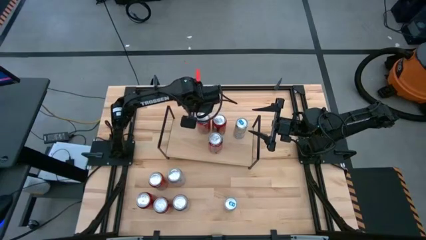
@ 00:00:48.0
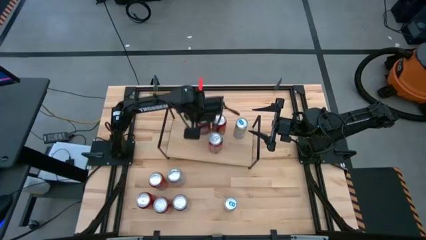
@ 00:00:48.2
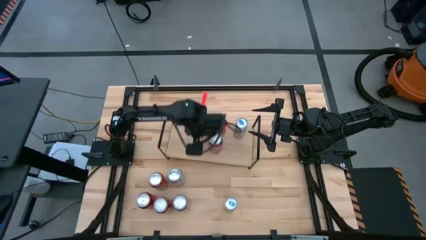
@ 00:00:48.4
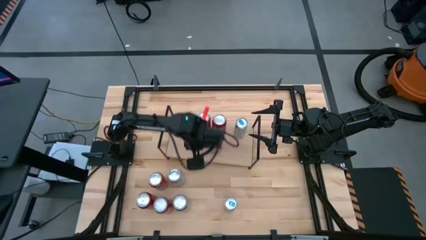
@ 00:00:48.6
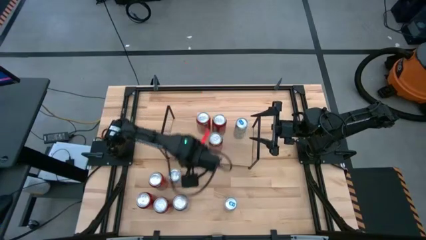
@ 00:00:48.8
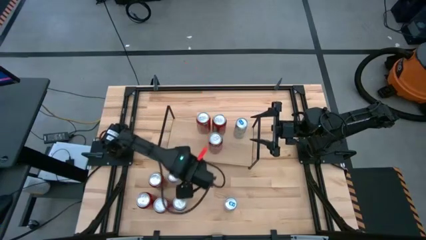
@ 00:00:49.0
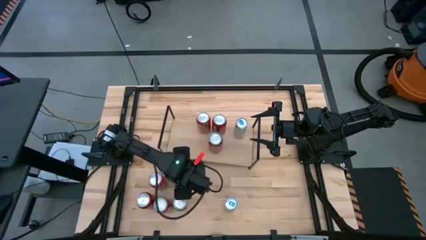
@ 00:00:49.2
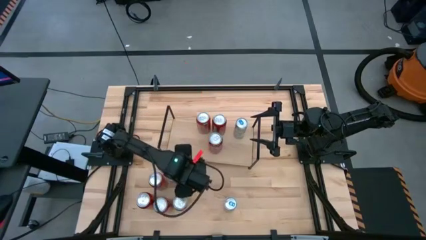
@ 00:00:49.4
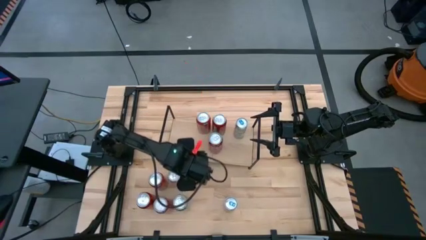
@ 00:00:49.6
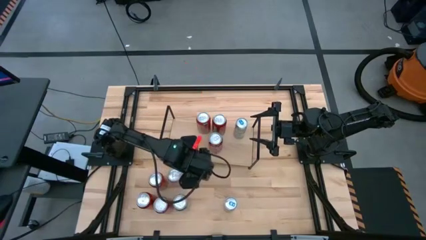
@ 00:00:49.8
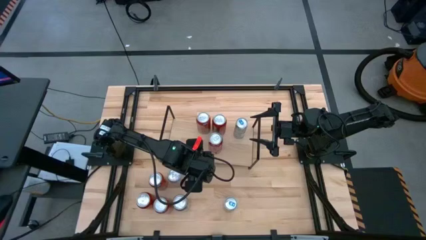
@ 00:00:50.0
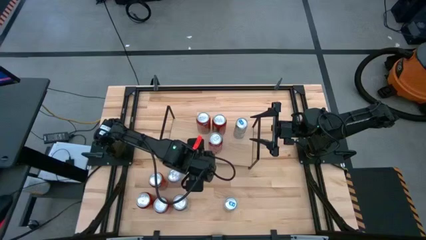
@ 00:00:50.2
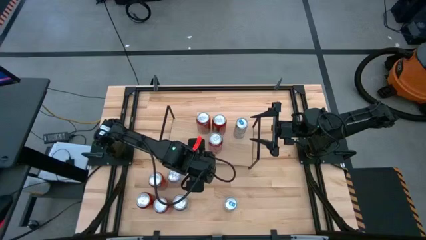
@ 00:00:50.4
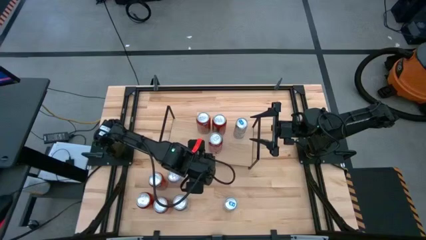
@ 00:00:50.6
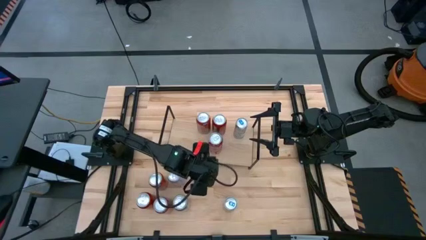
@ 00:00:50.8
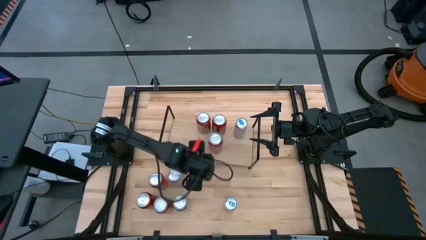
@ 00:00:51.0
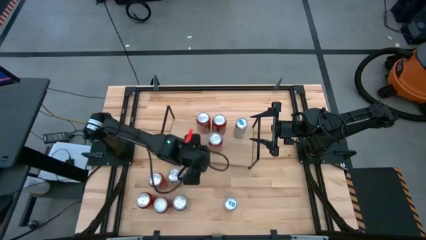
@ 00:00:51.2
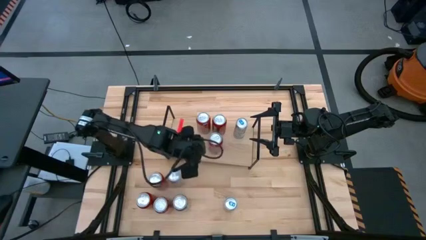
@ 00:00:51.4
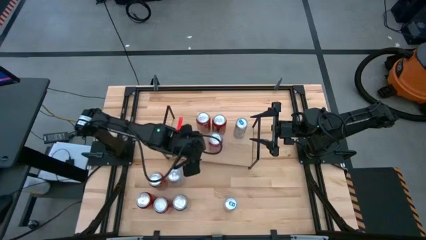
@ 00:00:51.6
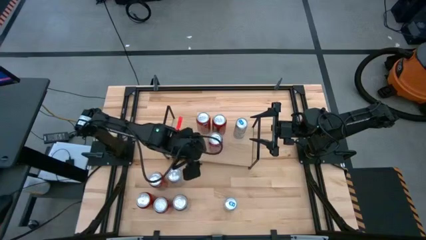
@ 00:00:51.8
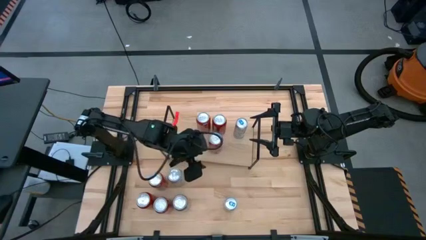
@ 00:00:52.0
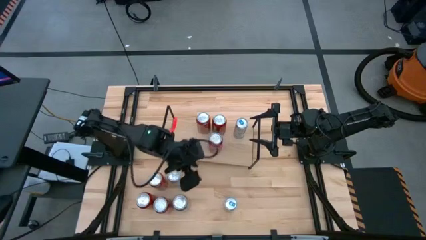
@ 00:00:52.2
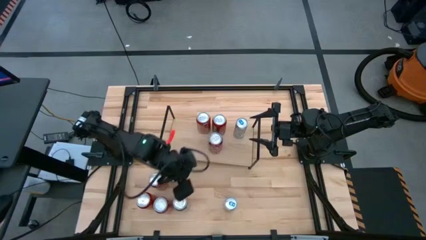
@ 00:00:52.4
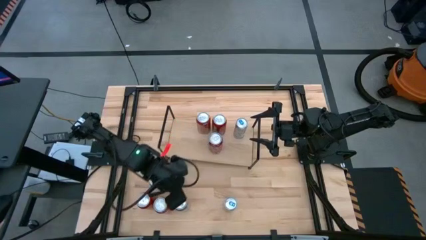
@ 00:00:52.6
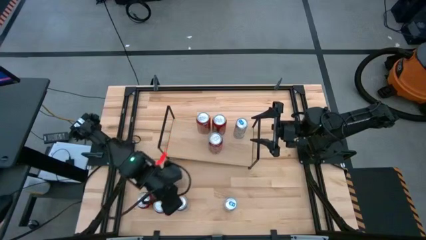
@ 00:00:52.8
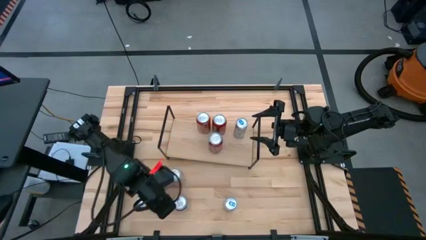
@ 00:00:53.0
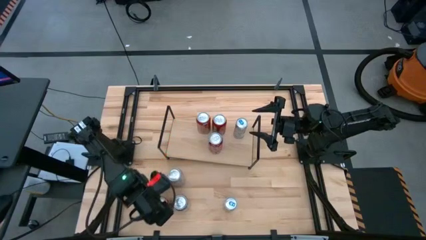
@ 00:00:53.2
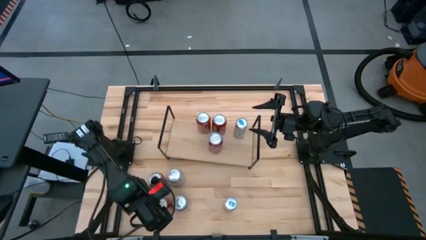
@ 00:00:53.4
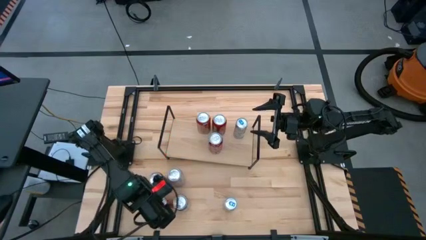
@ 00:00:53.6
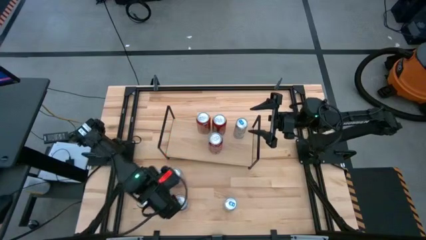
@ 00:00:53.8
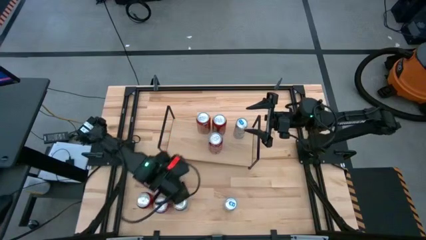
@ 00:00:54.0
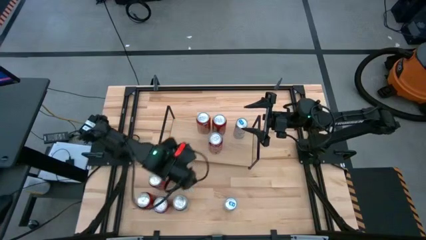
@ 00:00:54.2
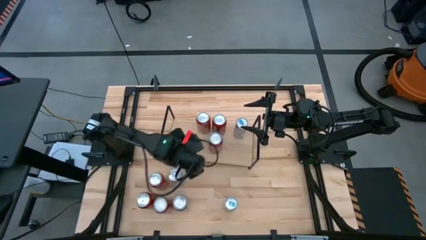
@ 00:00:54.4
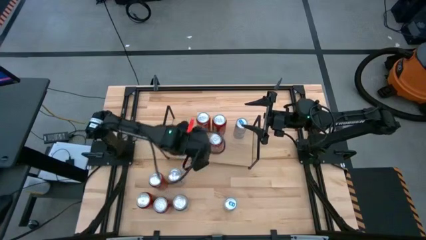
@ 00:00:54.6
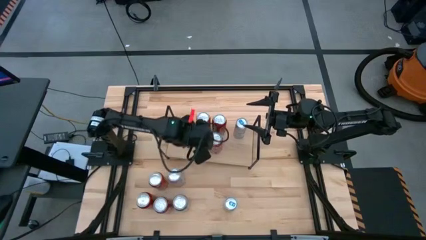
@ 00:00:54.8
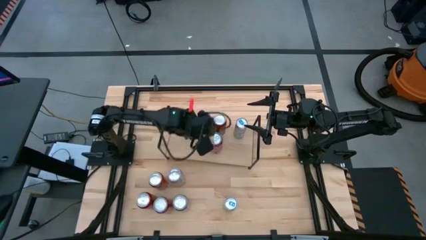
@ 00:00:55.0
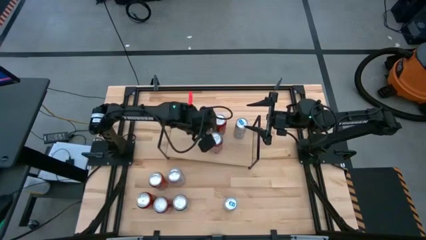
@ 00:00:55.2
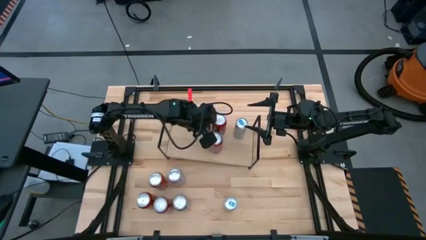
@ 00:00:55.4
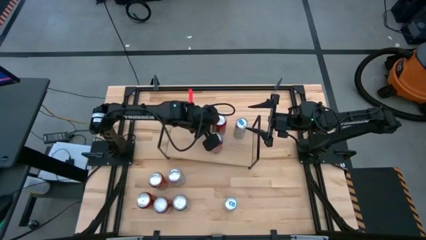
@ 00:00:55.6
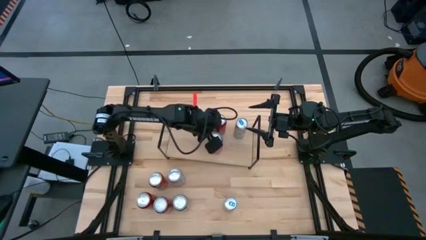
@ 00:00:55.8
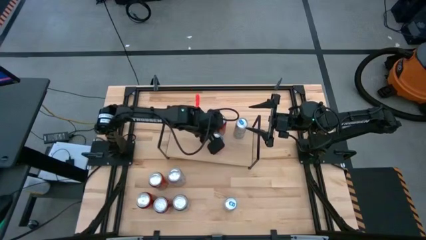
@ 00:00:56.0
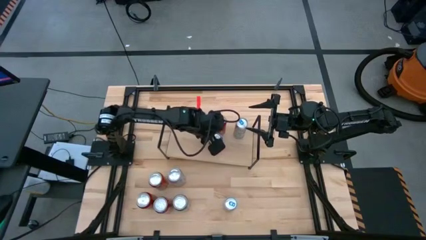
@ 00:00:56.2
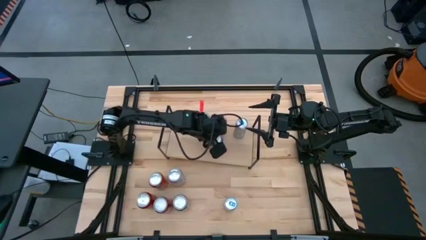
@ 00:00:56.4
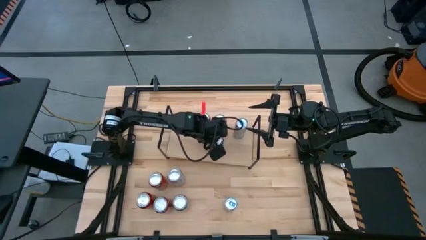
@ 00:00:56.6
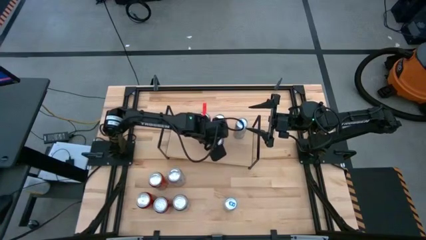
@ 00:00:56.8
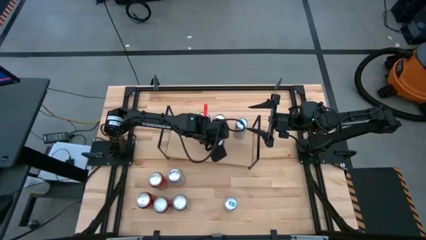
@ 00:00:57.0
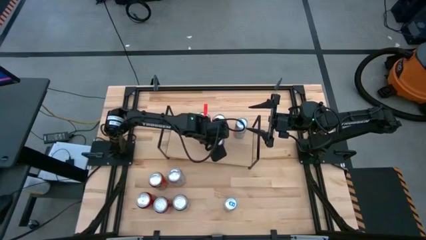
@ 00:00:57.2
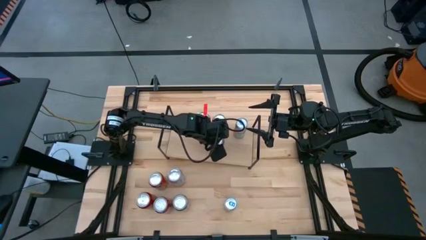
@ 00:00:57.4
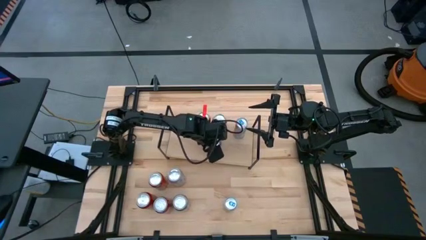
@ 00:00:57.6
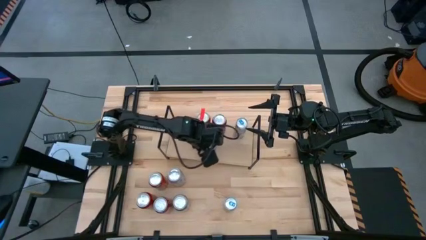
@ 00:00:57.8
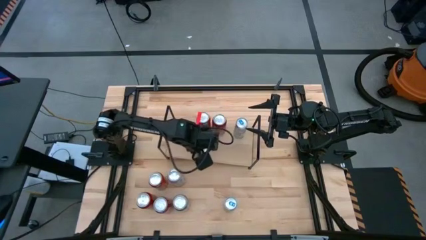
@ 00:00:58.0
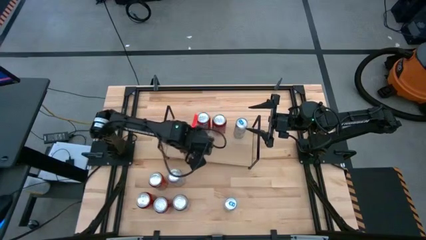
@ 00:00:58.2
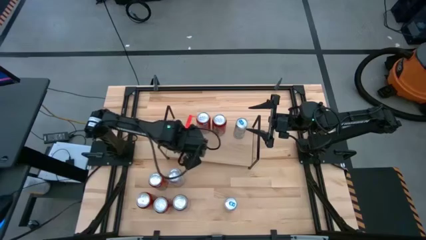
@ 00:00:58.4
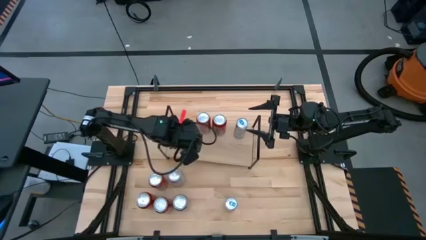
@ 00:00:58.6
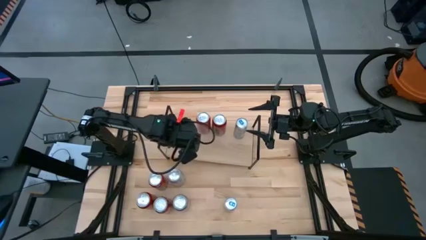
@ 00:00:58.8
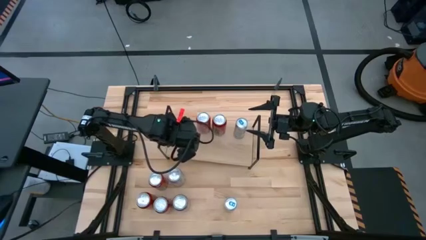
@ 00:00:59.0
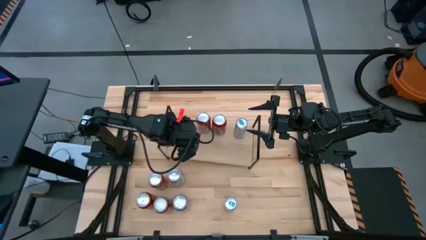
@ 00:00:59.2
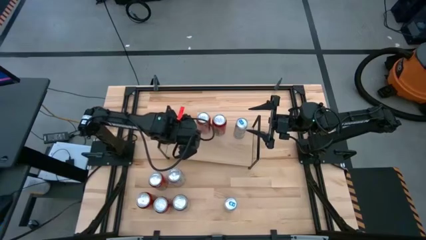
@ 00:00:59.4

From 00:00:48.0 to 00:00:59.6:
Task: Place canned beverage on shelf
Adjust the red-white soda can on the shelf
